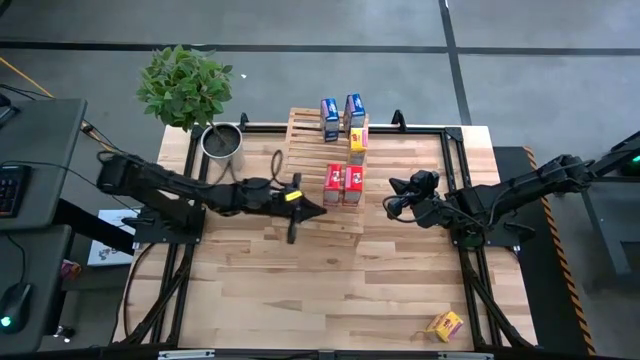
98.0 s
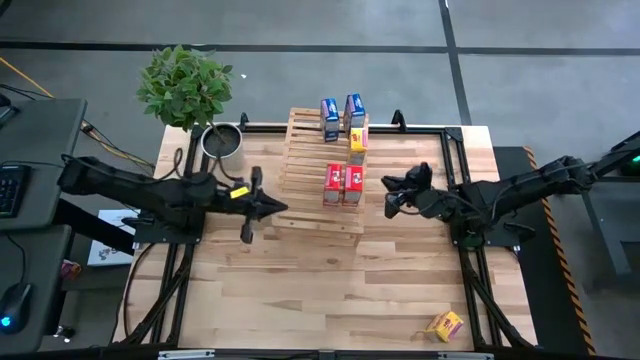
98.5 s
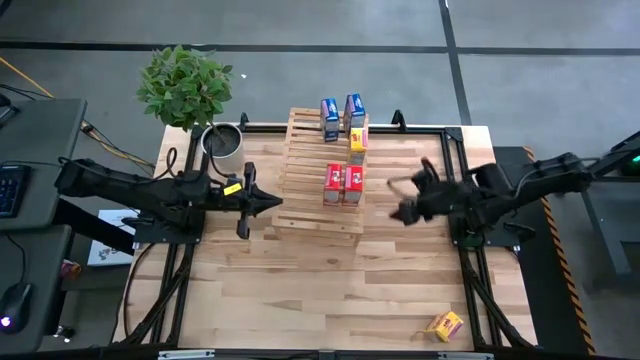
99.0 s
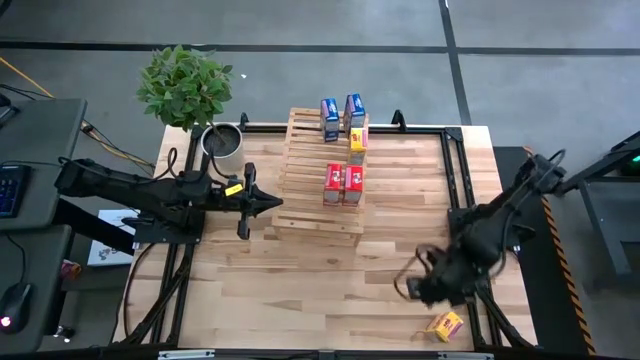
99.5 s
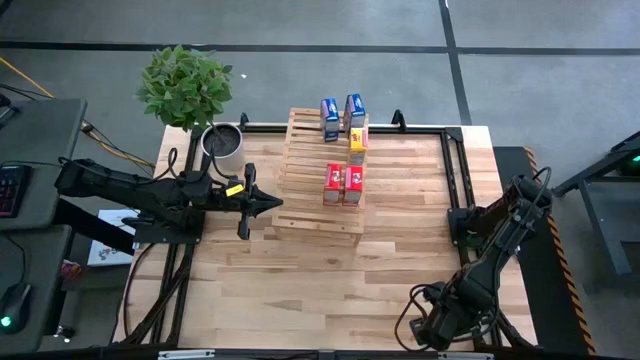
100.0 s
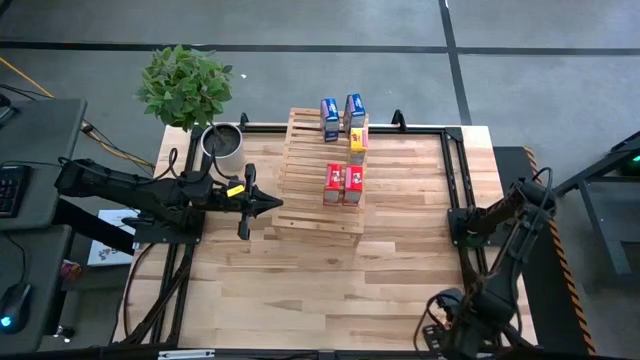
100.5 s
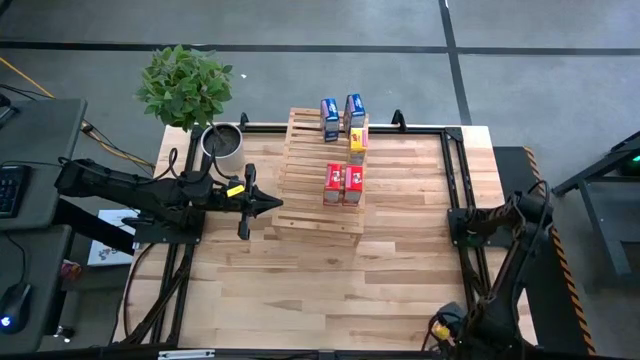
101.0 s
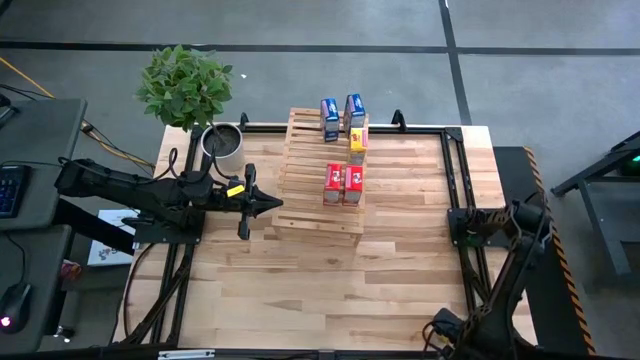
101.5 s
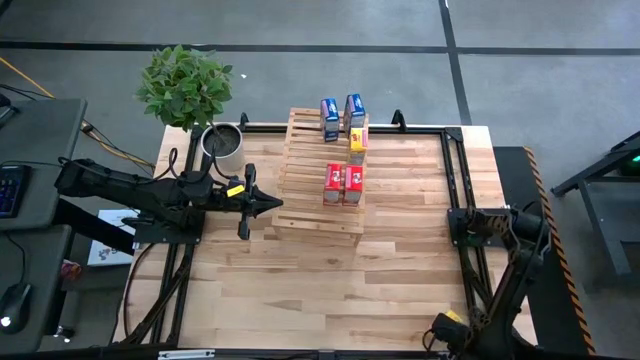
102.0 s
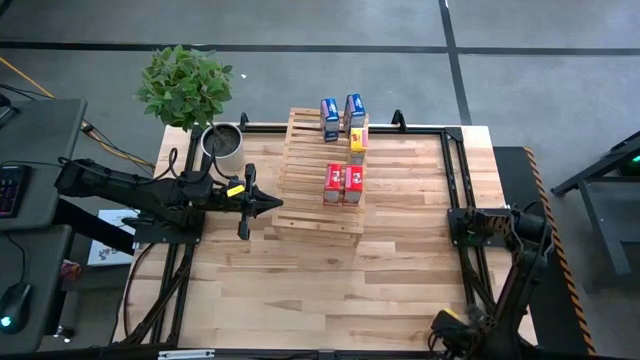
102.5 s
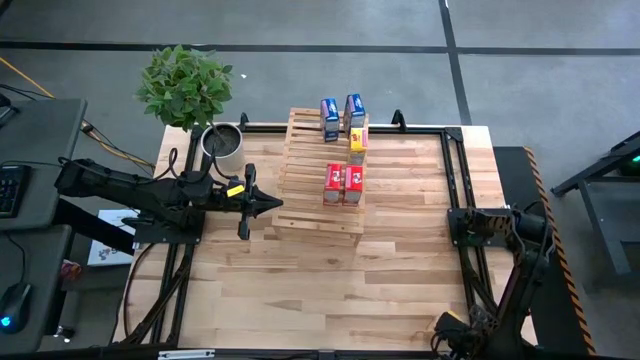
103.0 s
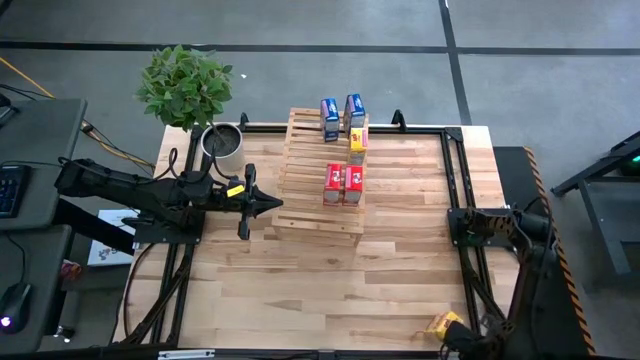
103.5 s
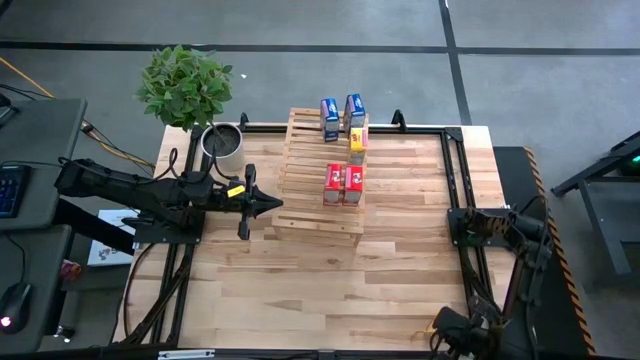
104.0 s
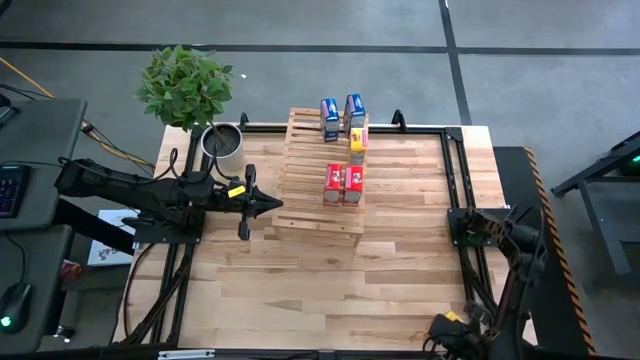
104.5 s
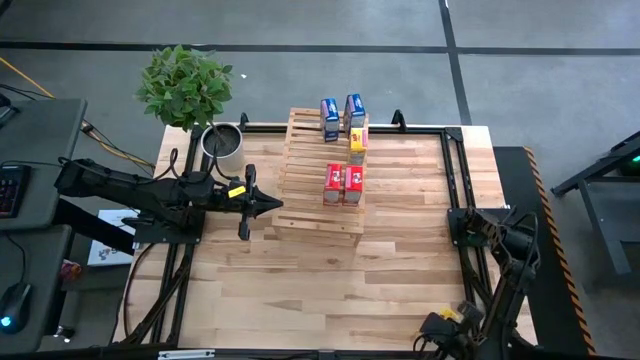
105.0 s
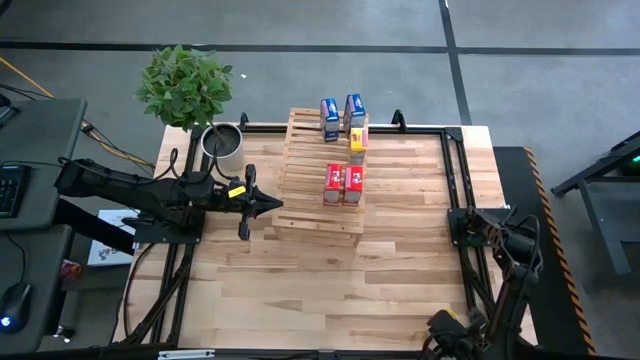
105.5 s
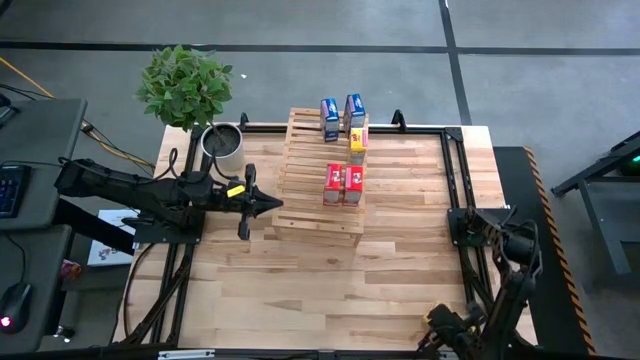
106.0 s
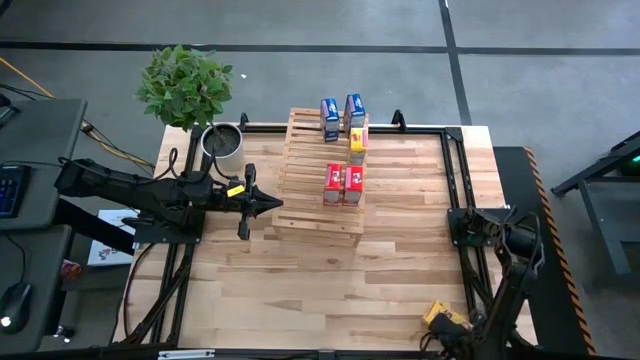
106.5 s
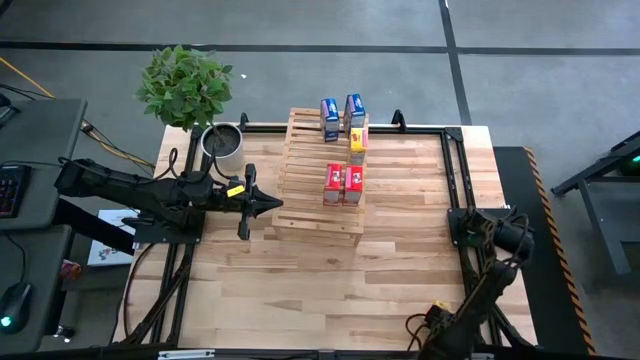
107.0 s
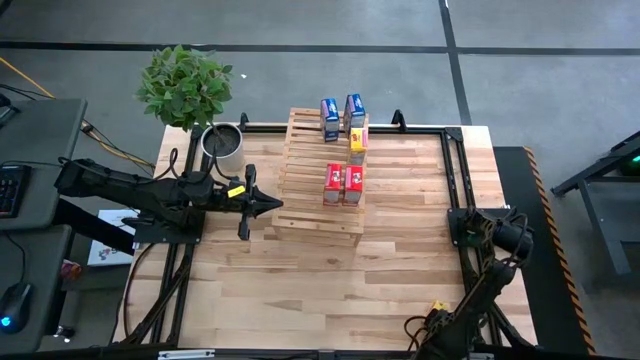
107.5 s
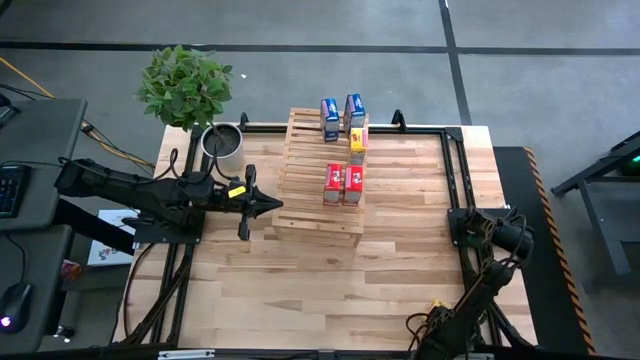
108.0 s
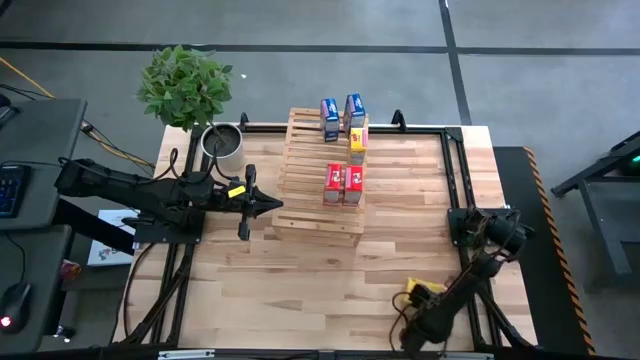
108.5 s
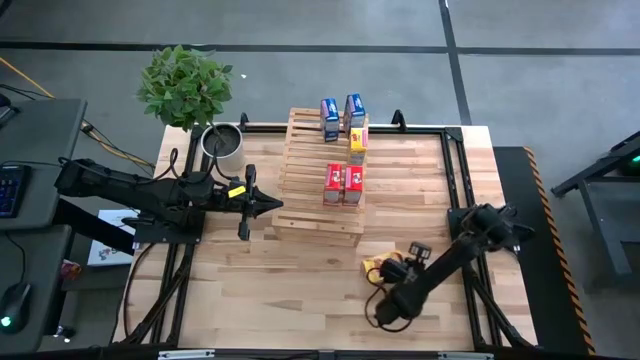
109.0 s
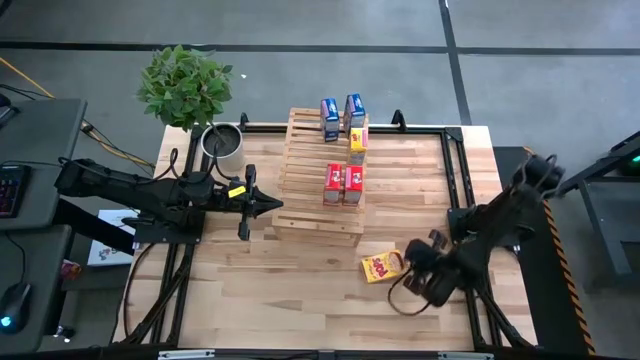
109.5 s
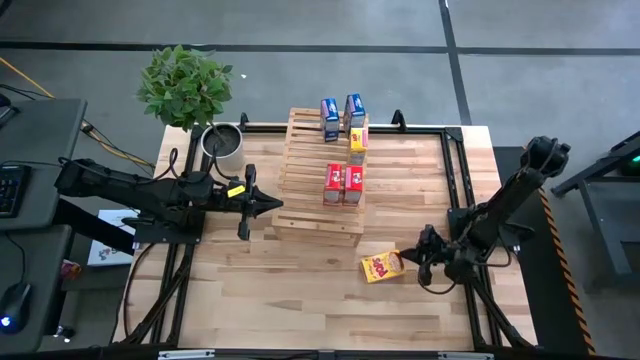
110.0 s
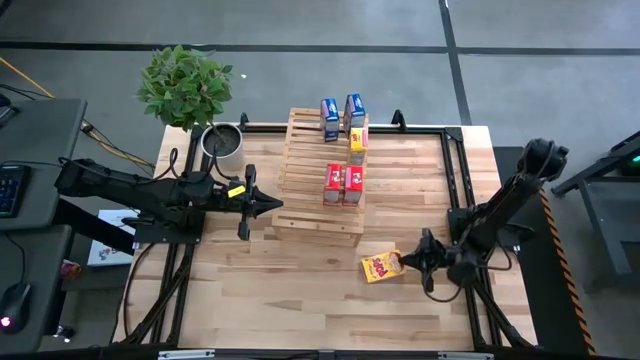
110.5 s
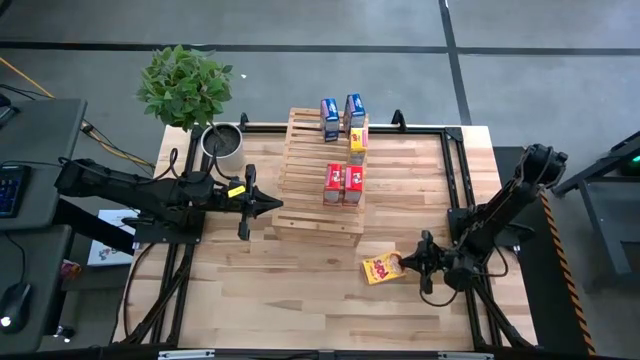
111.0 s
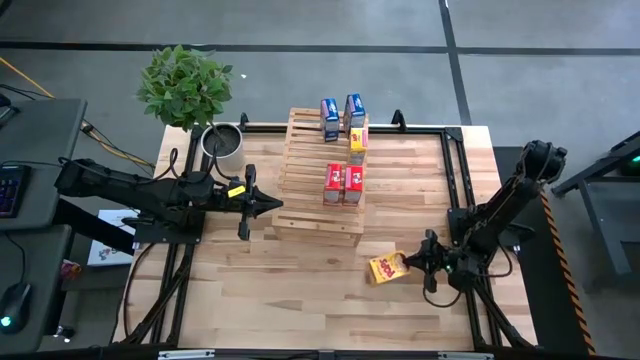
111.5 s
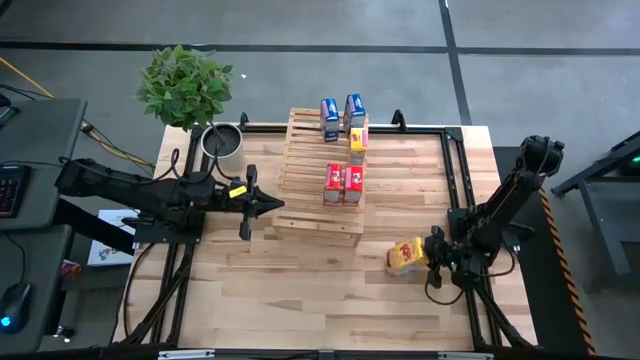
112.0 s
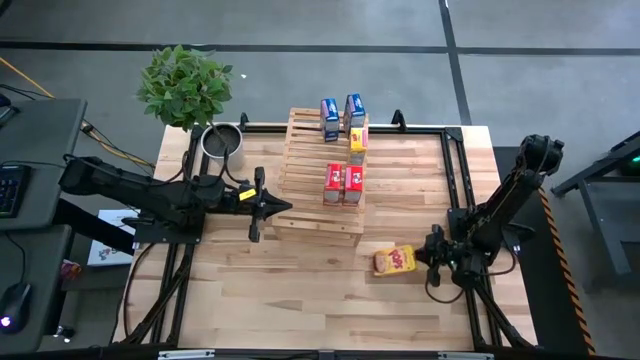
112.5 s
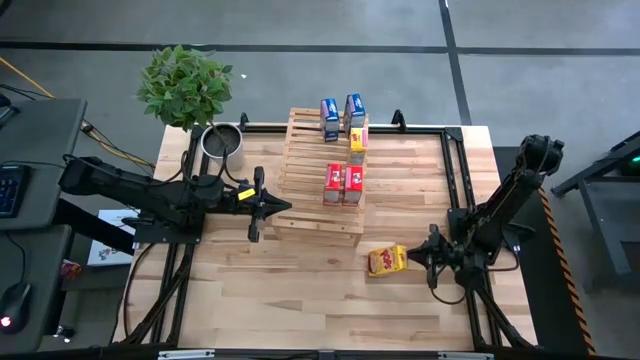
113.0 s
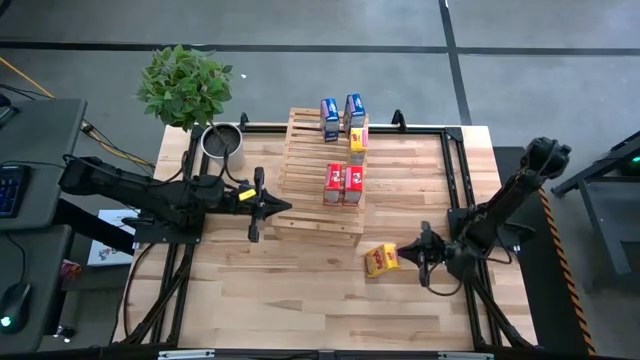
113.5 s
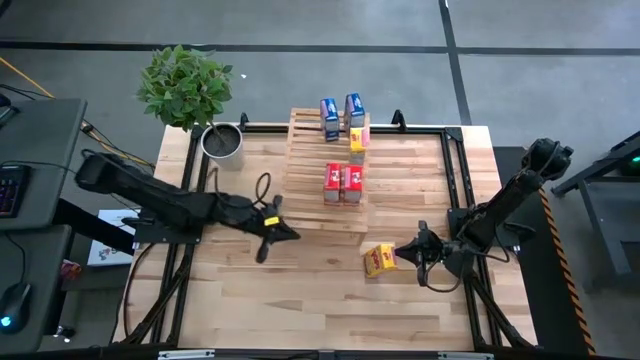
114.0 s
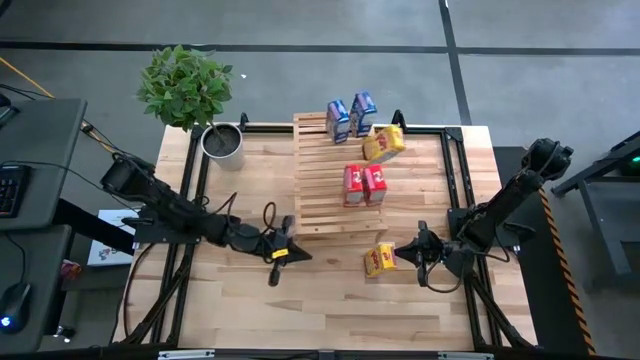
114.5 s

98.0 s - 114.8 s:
Task: Stack cereal on shelf
Put the yellow cereal box on the shelf aligned with the other yellow cereal box

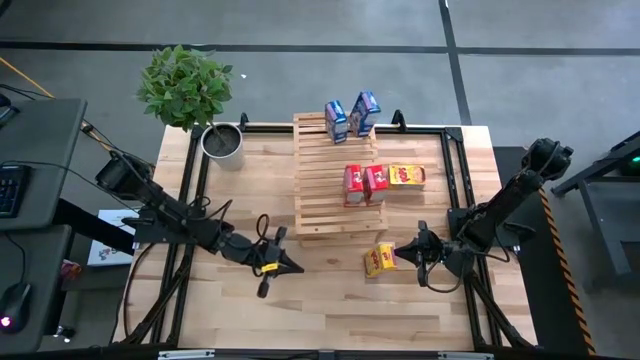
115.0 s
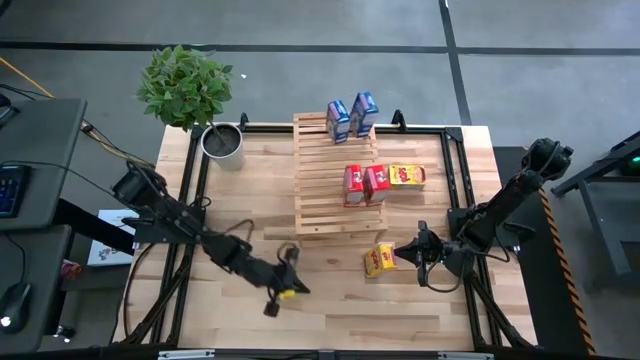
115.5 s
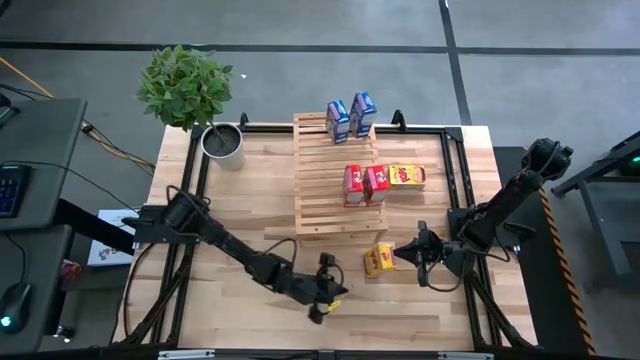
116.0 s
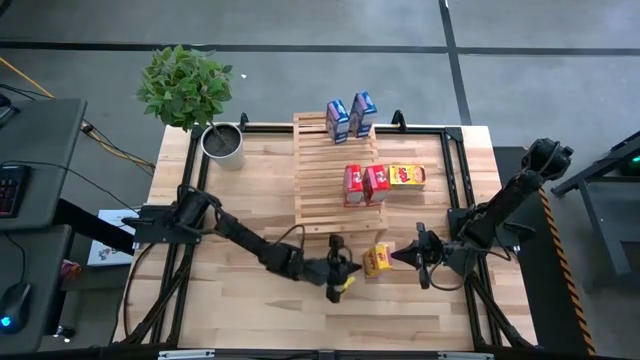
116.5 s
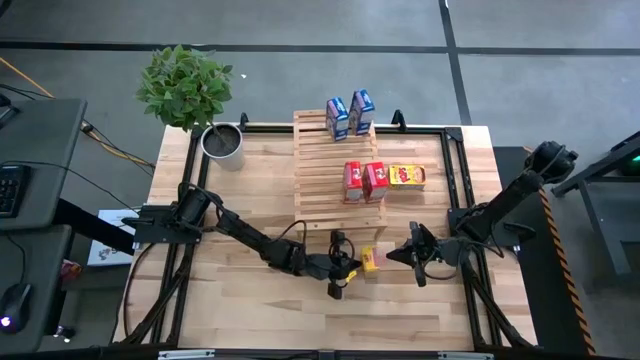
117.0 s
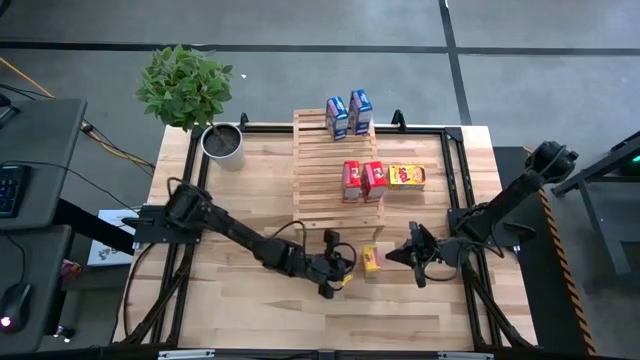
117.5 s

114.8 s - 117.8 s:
Adjust the shelf on the table

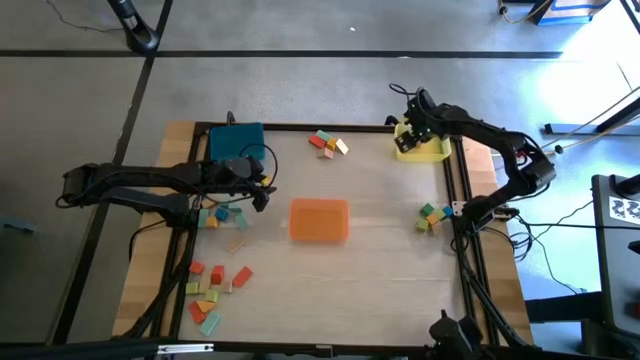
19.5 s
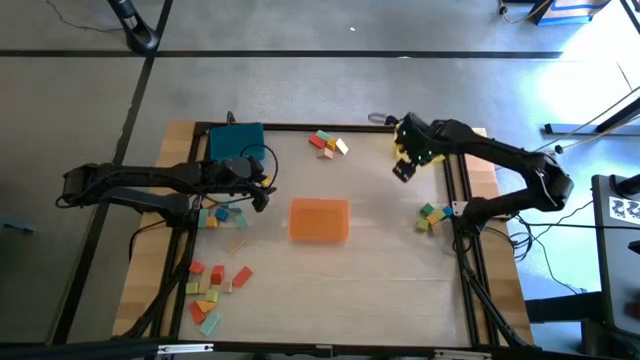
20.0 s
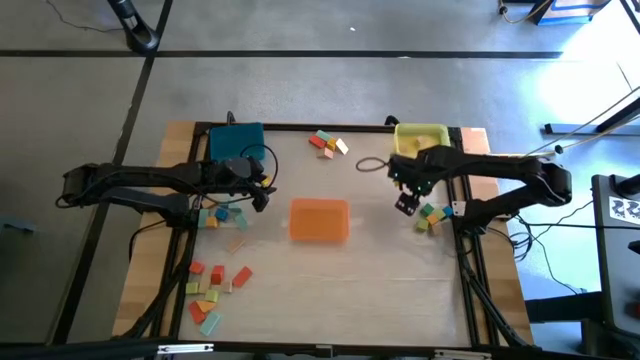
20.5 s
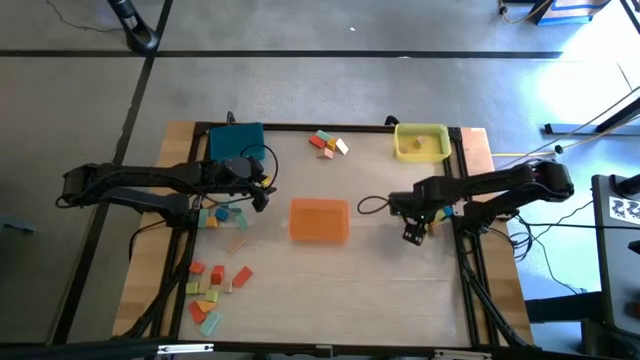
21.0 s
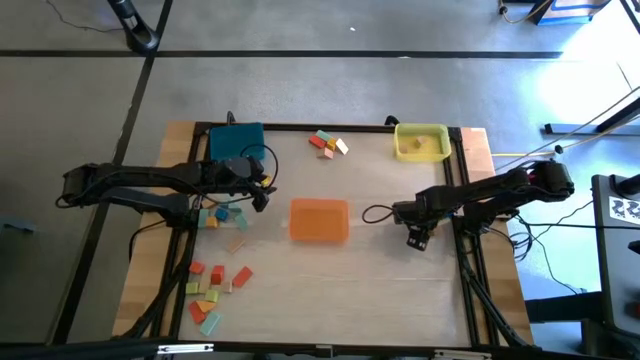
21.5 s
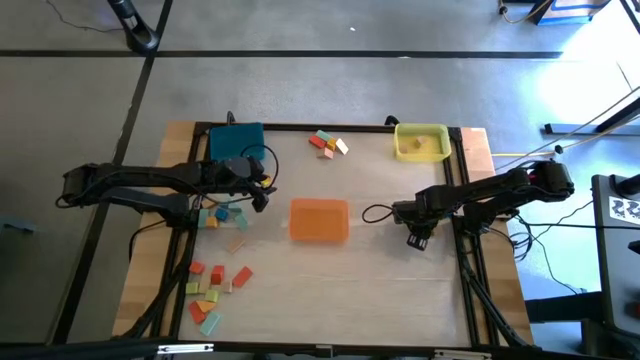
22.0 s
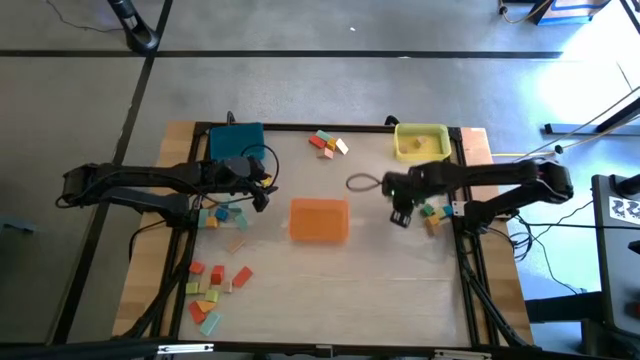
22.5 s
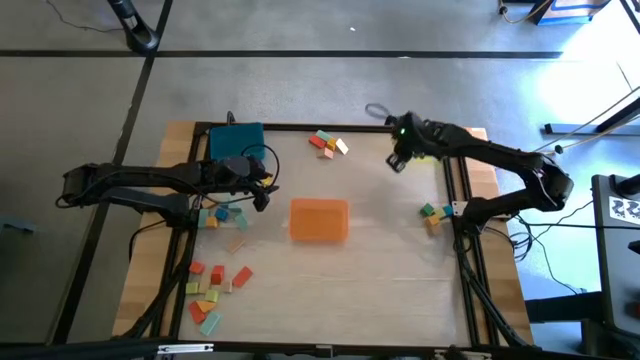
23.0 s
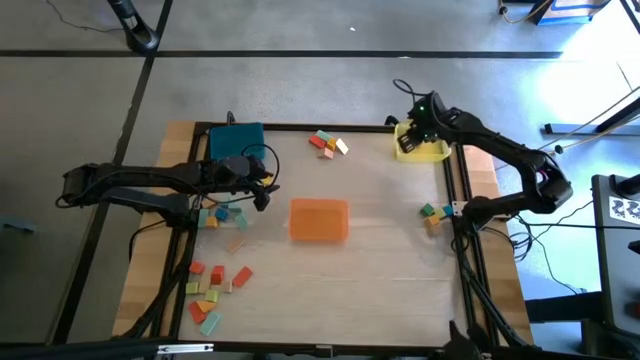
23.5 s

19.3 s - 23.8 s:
Task: Sort blocks by size
Put the light green cube block into the yellow bin
